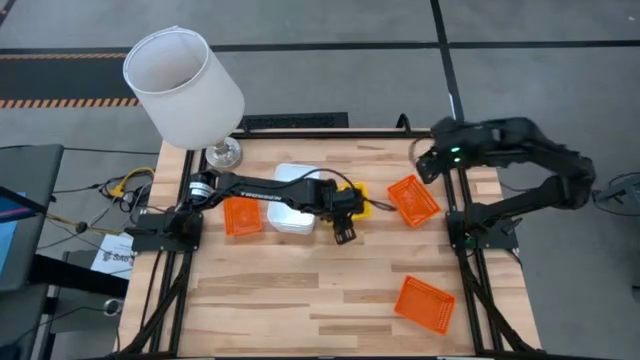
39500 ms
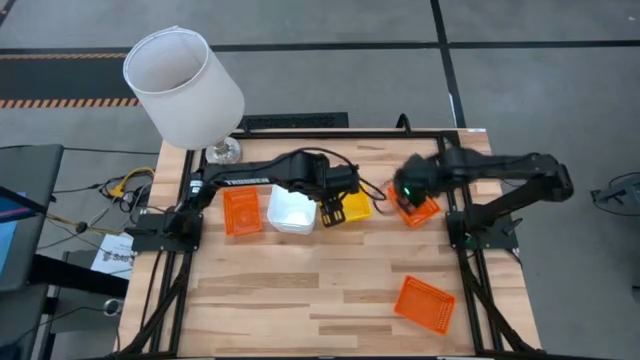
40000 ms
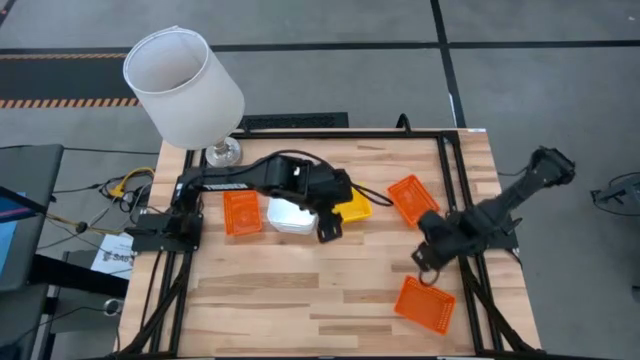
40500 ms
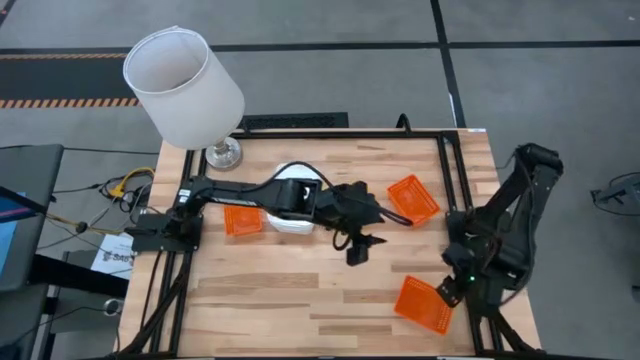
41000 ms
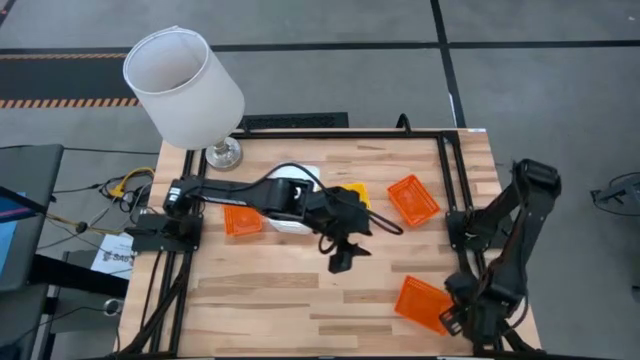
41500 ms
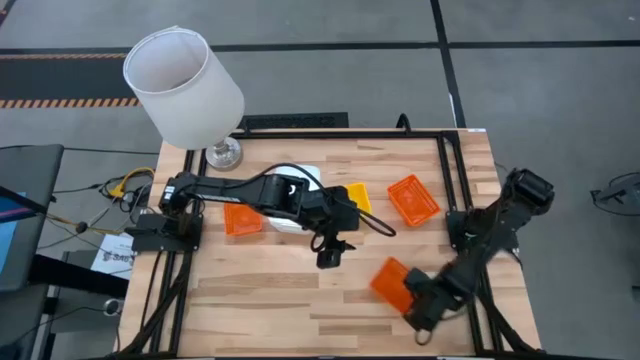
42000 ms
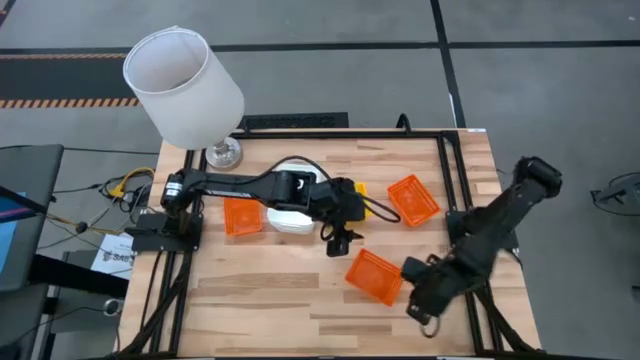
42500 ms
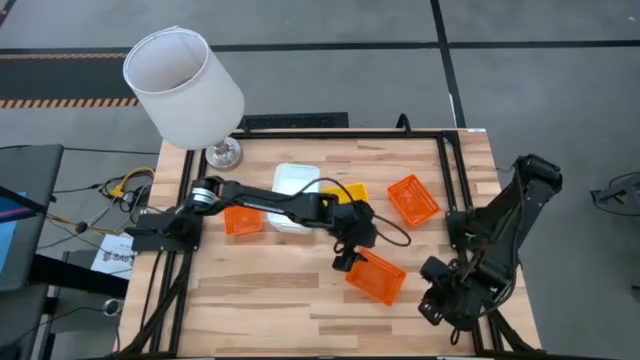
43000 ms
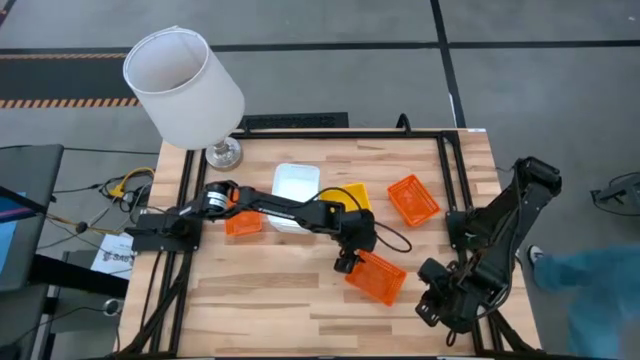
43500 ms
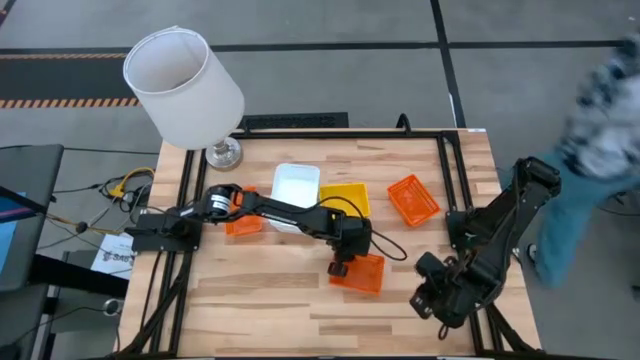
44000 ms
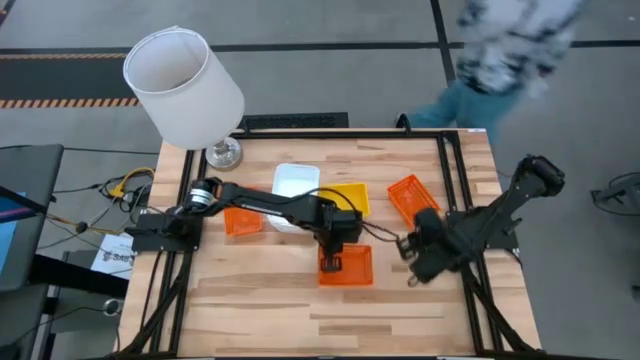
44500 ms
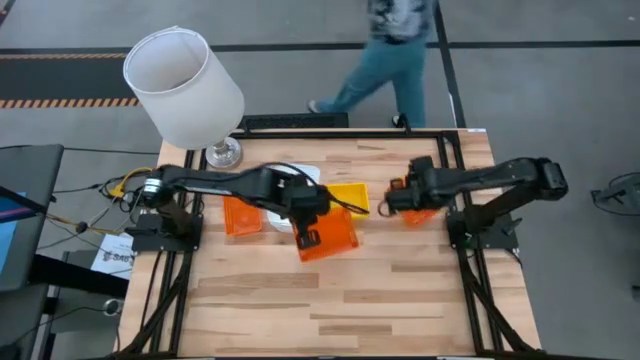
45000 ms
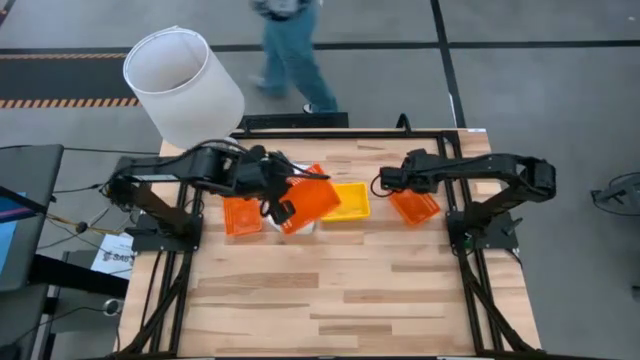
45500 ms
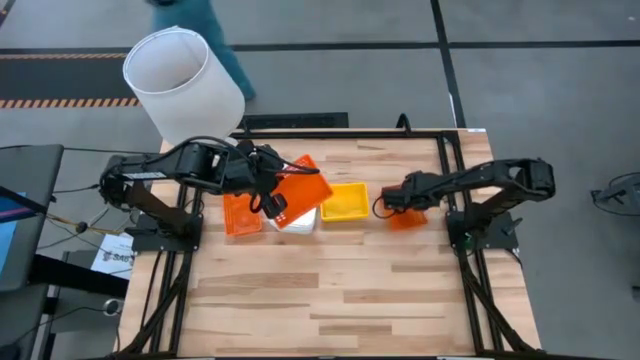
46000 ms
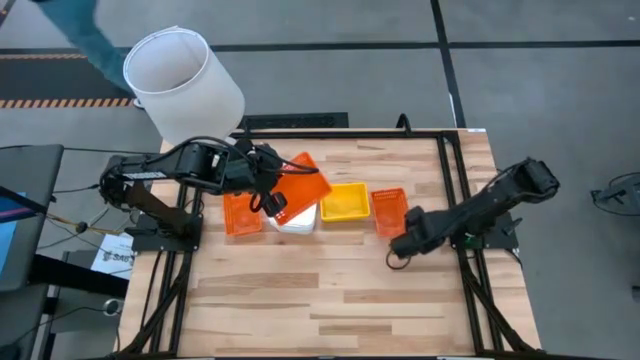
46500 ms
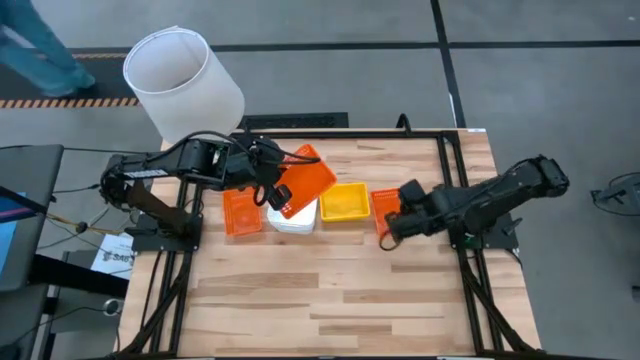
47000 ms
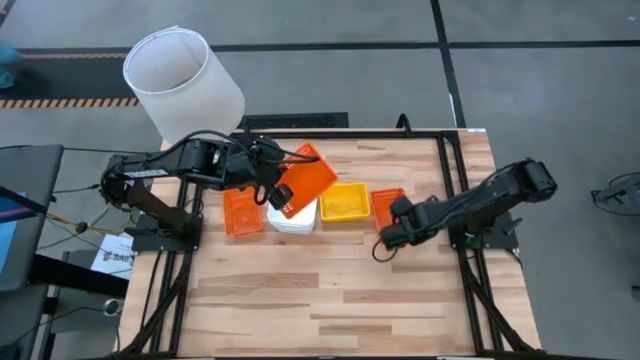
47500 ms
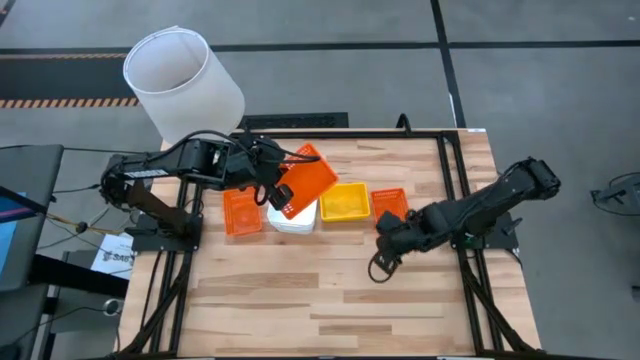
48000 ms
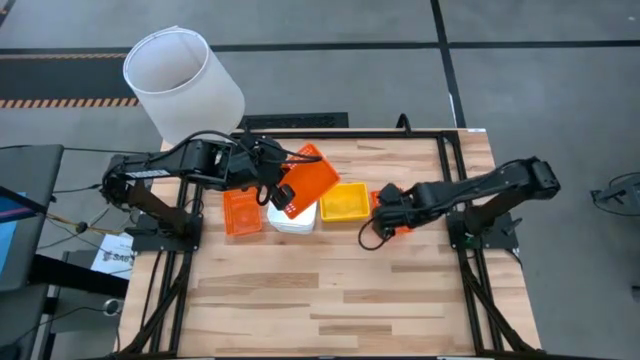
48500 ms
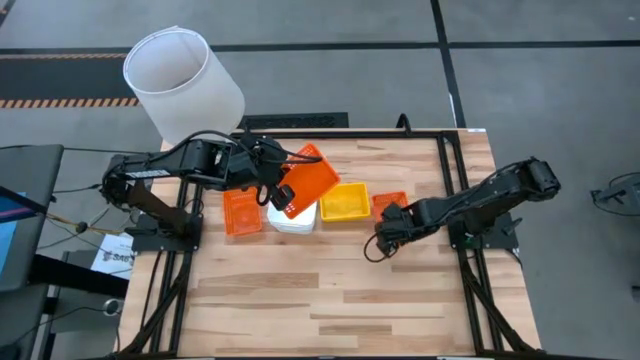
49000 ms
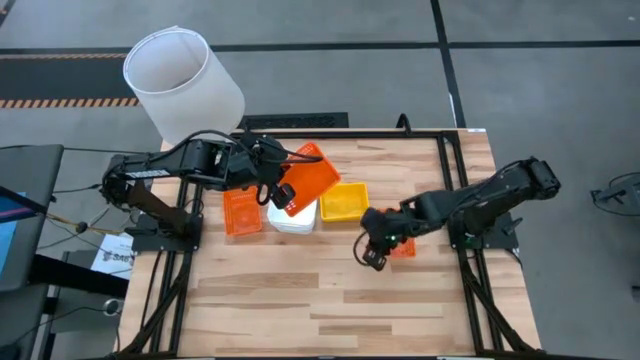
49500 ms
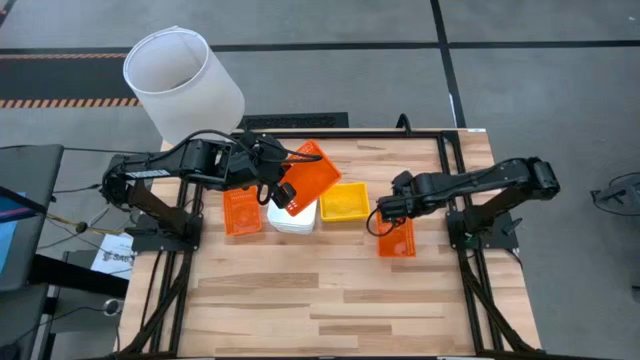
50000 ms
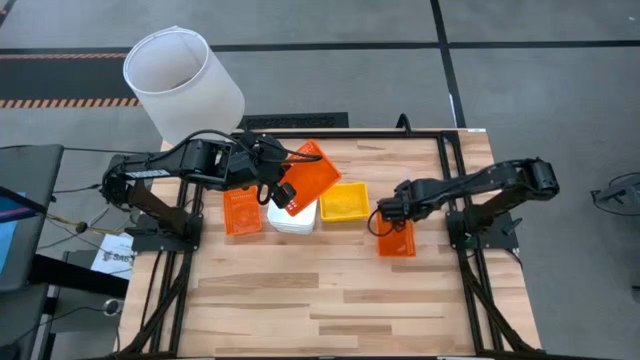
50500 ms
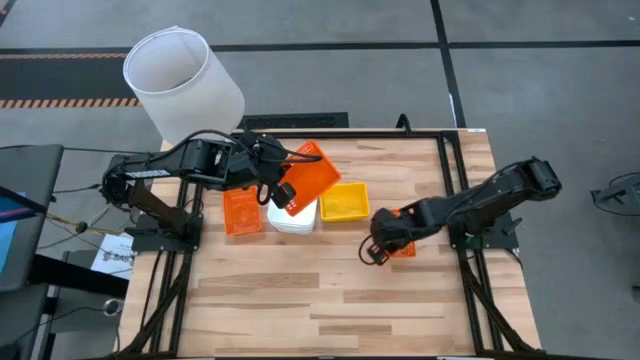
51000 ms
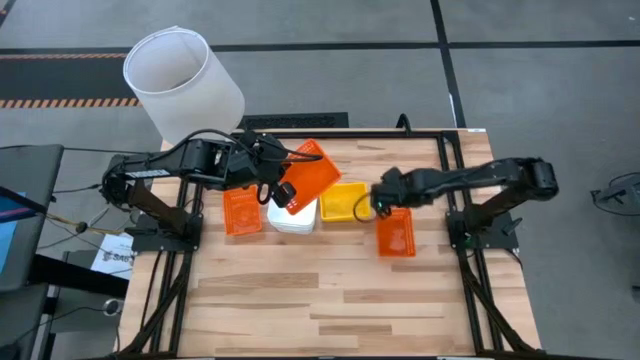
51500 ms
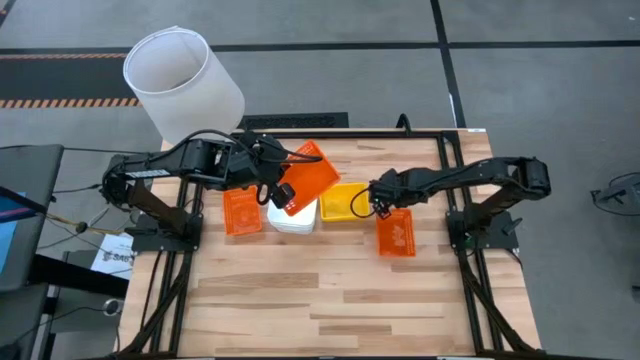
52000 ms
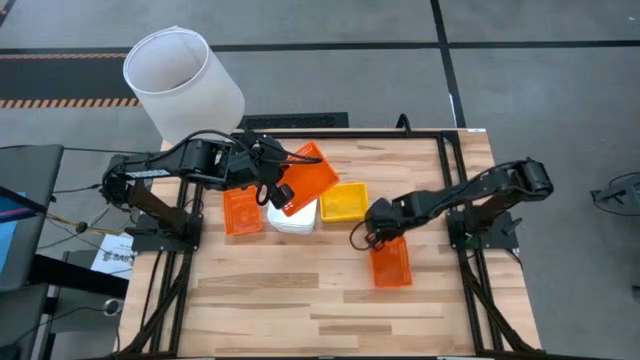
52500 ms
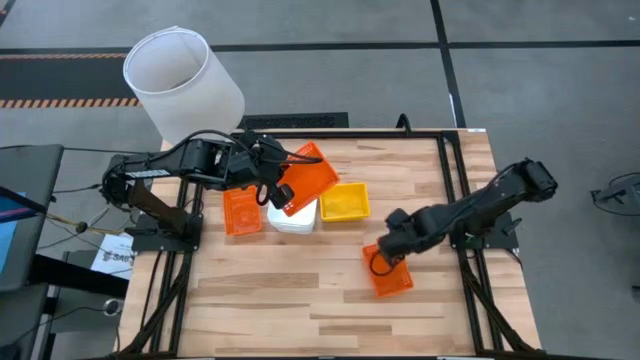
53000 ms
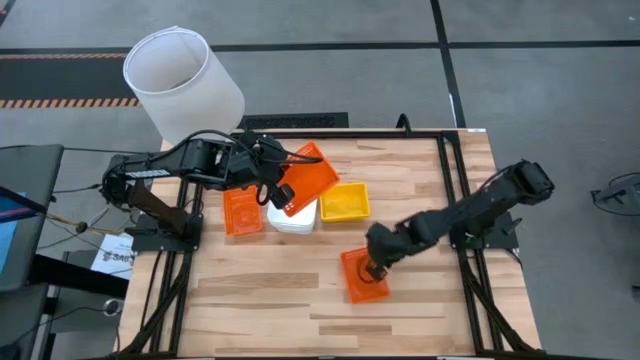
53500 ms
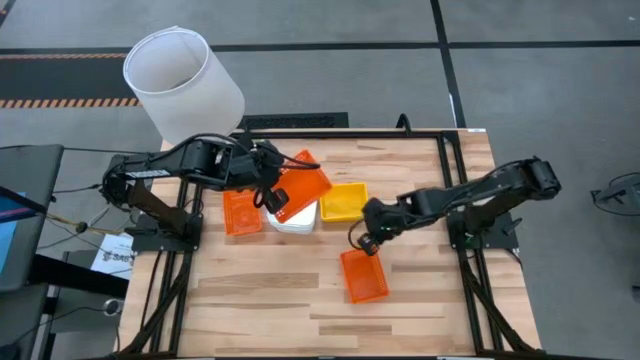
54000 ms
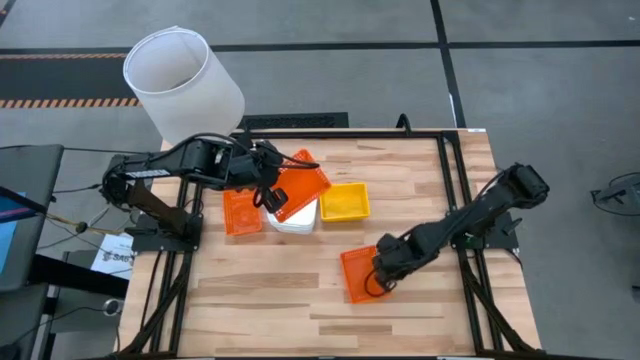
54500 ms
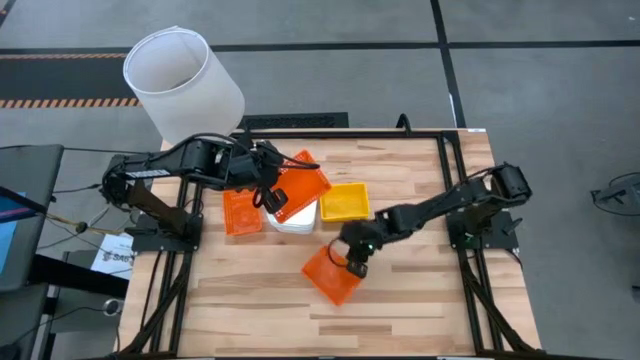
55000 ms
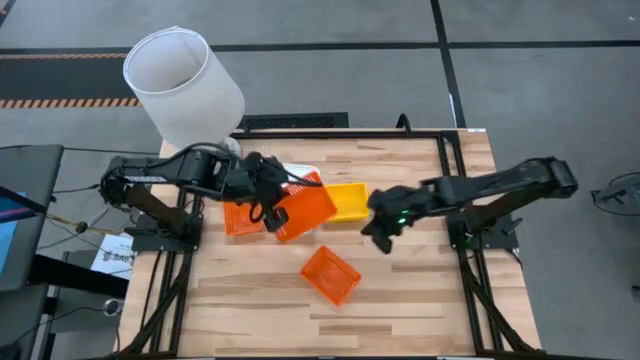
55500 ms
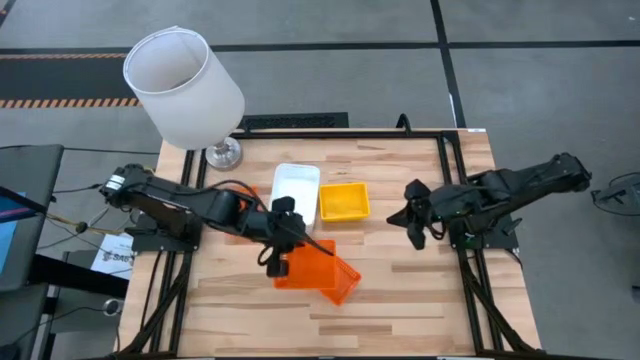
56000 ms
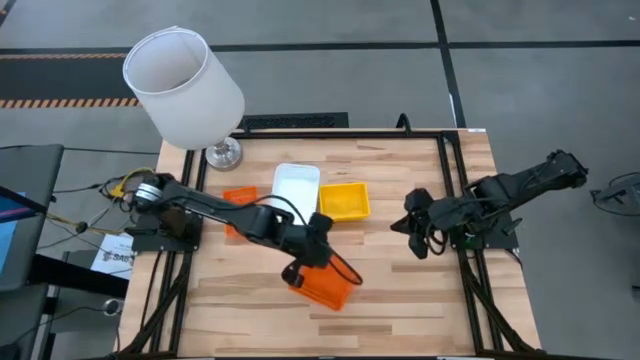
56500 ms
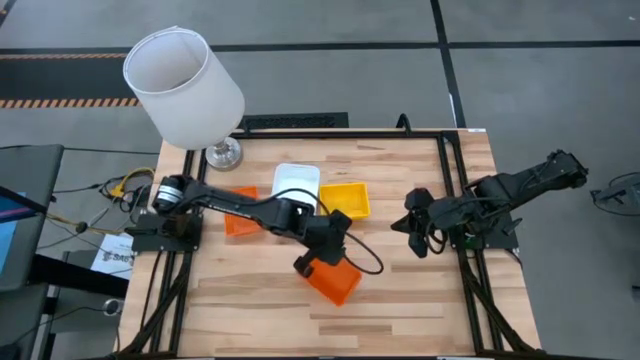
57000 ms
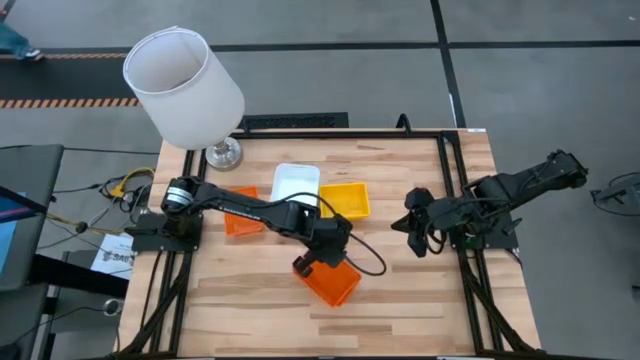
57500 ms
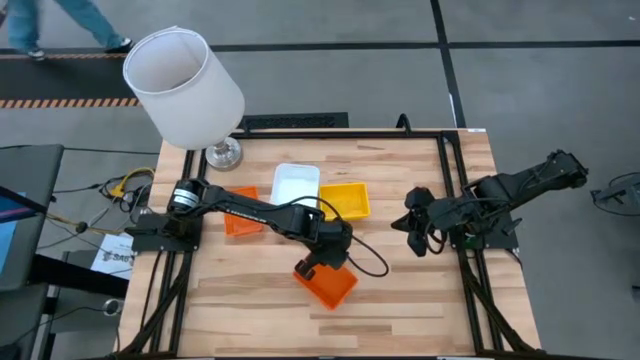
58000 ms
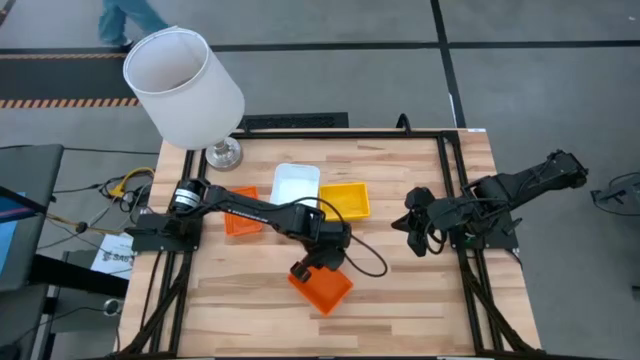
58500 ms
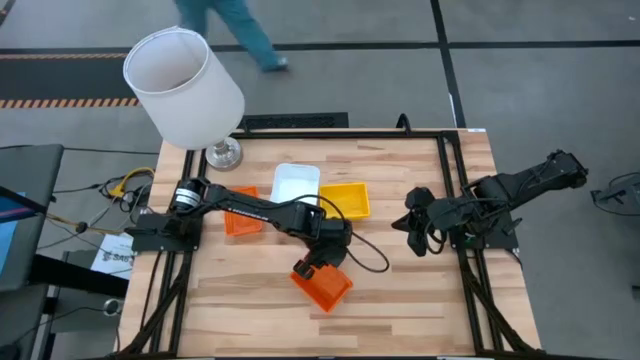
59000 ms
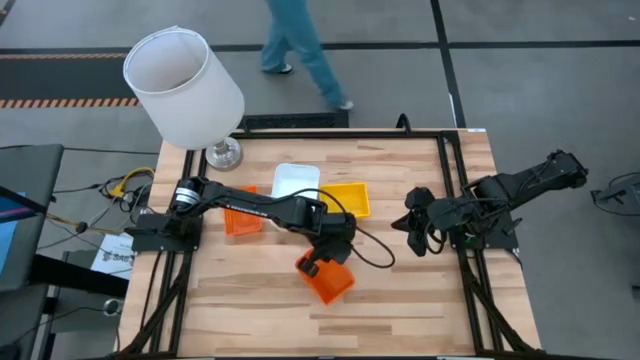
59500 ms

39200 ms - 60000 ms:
Stack the bottom orange bin on top of the top right orange bin

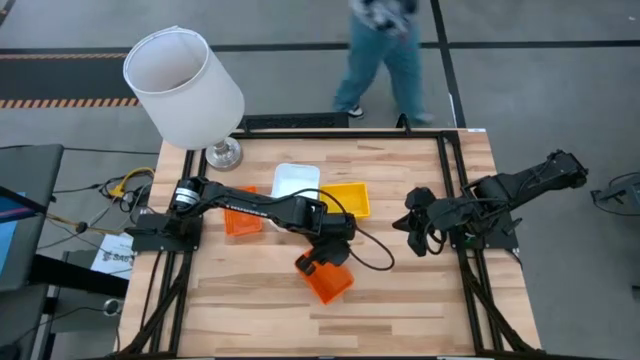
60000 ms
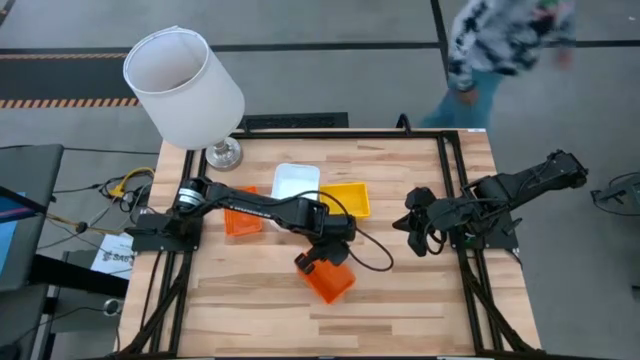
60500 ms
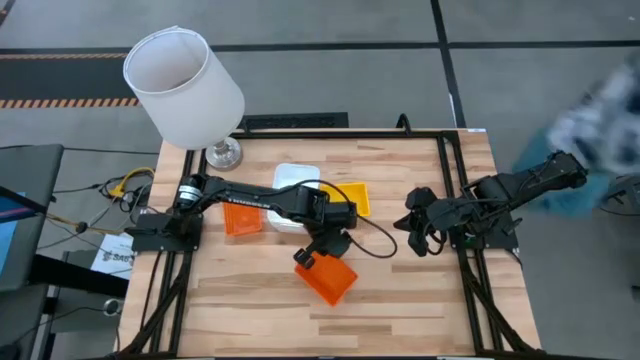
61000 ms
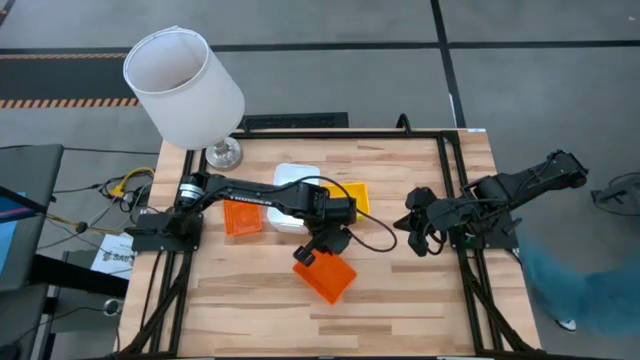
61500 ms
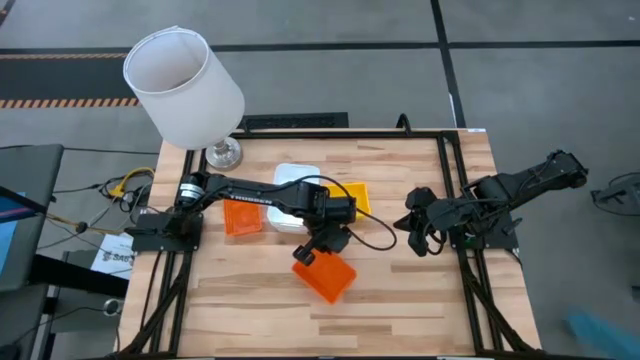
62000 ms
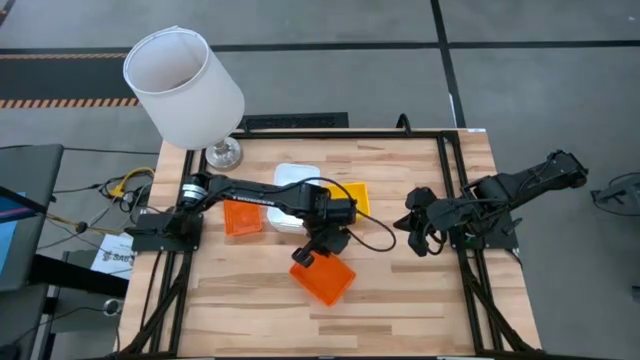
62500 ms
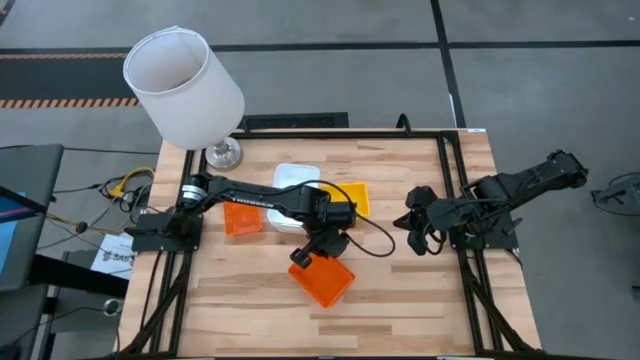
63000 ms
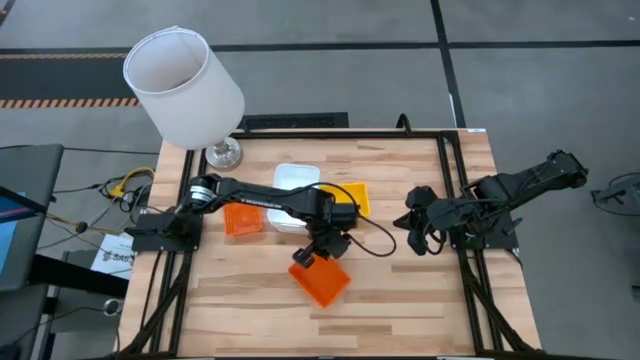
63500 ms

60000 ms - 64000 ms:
Stack the bottom orange bin on top of the top right orange bin
